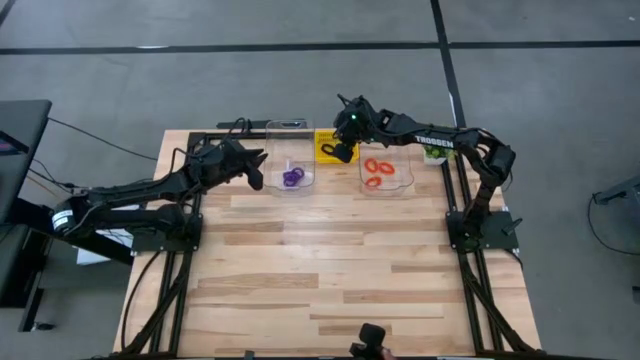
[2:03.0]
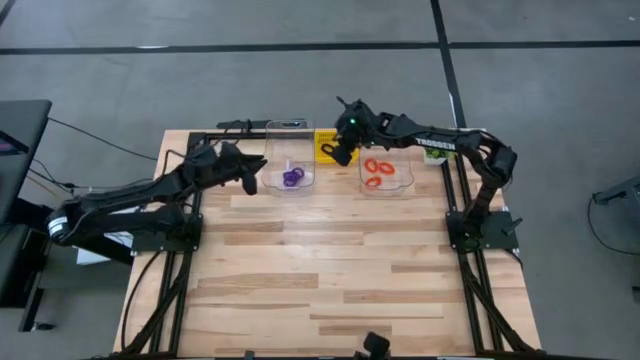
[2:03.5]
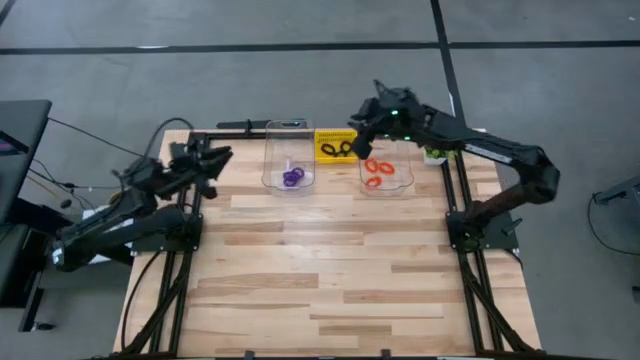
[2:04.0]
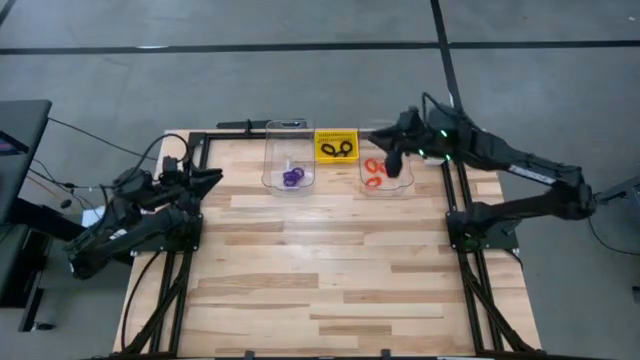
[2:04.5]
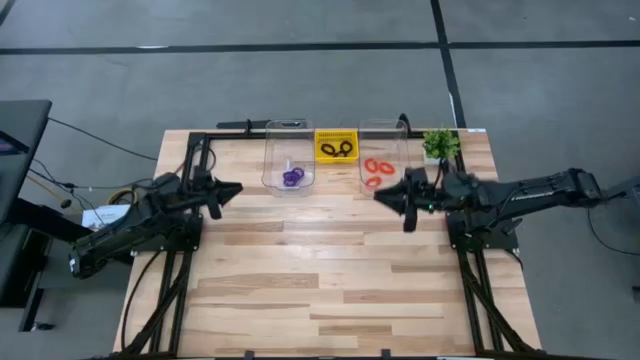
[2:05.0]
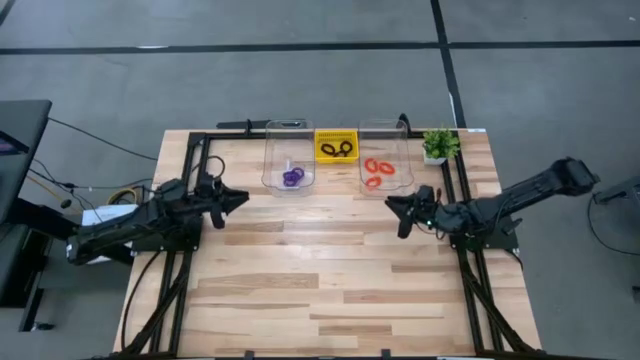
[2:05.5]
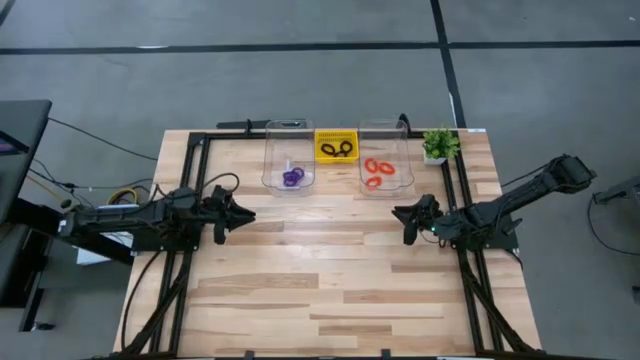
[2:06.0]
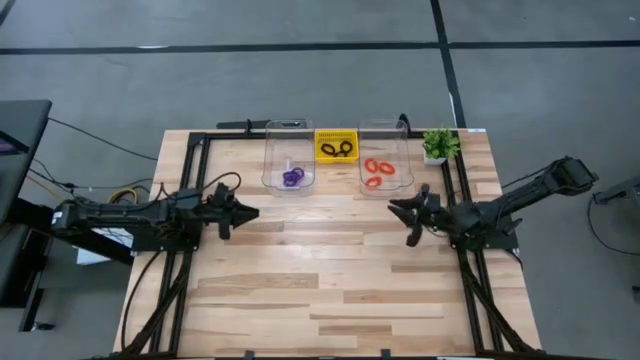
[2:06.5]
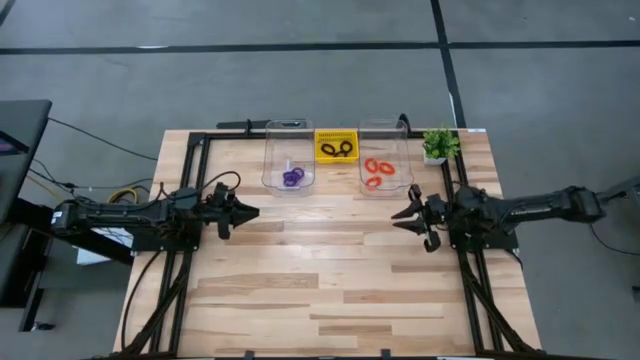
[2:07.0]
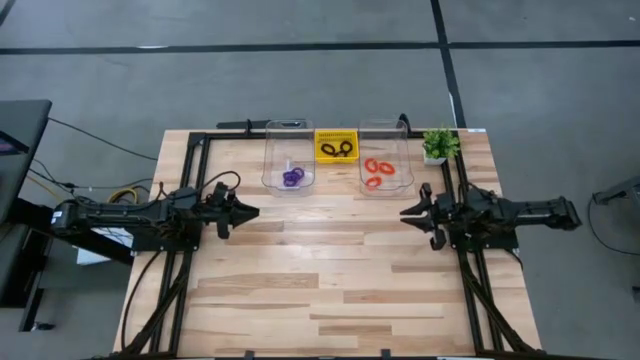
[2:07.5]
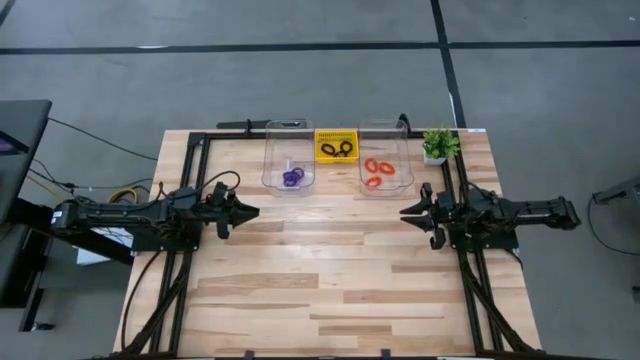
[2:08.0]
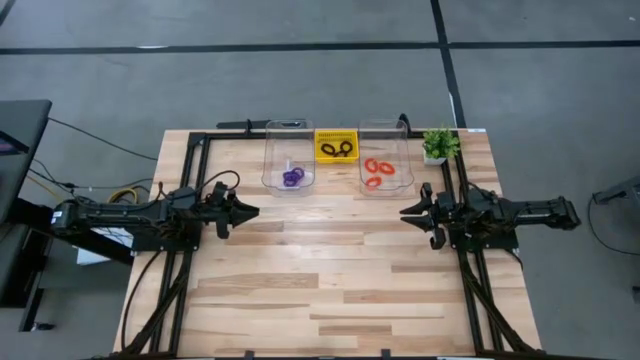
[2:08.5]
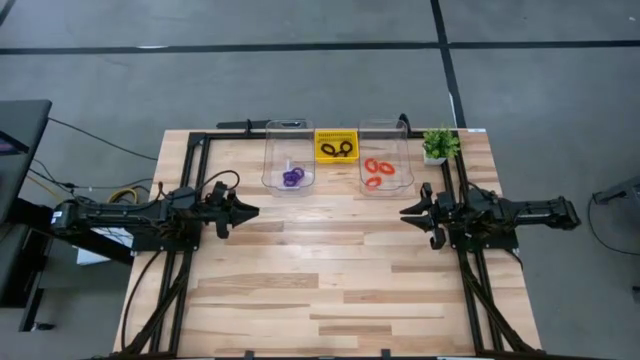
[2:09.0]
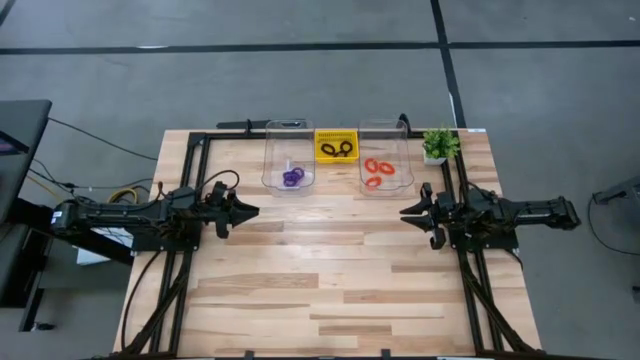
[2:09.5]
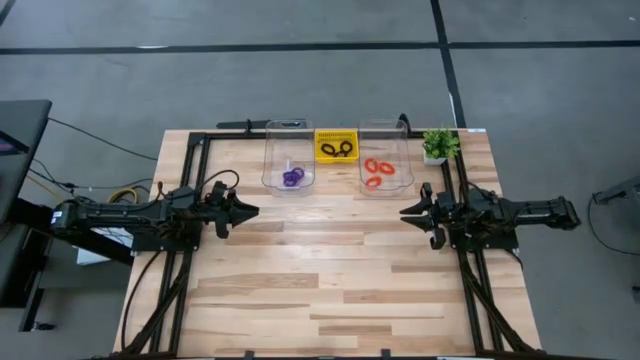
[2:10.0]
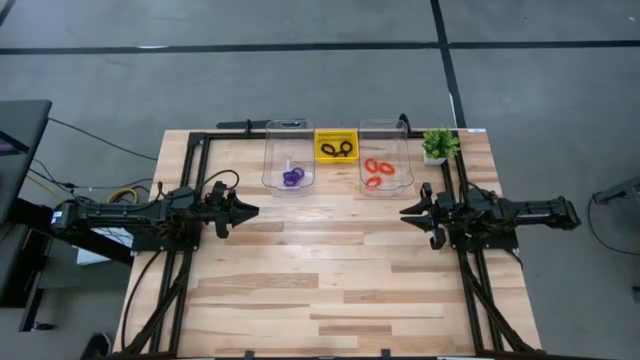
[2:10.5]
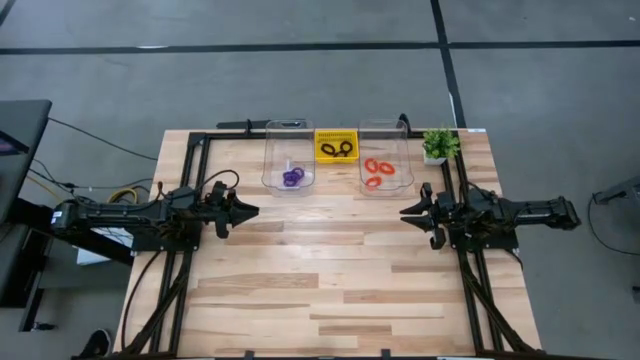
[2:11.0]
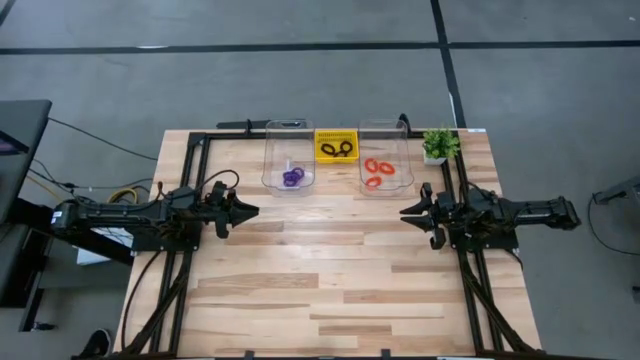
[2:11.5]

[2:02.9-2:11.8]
Task: Sort spring keychains
Return to Home Position

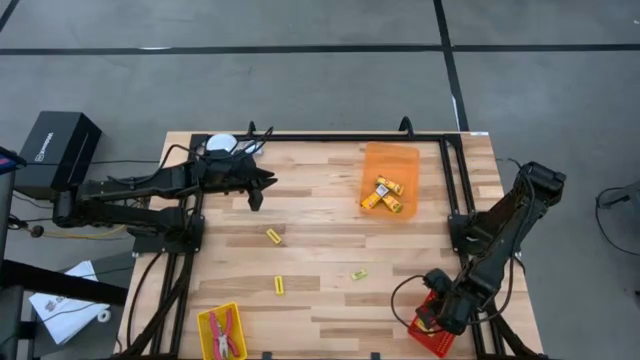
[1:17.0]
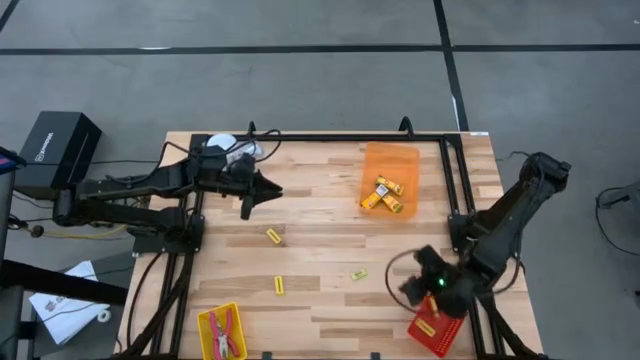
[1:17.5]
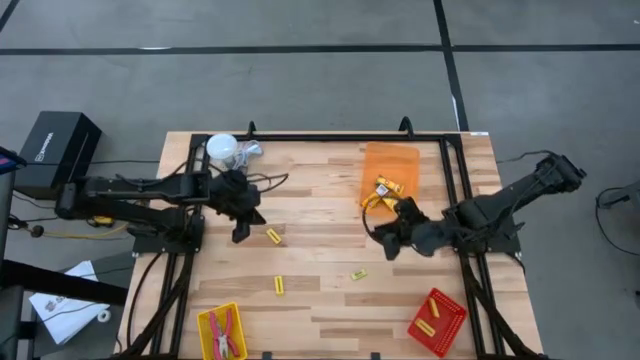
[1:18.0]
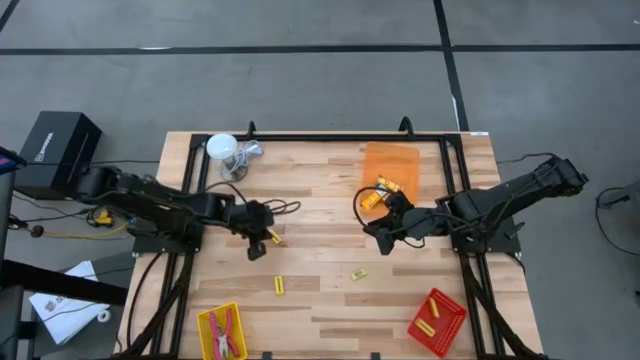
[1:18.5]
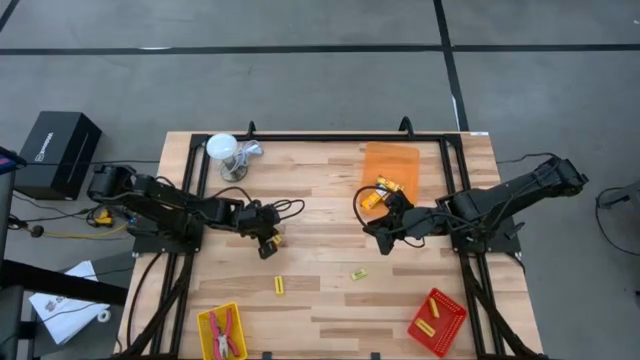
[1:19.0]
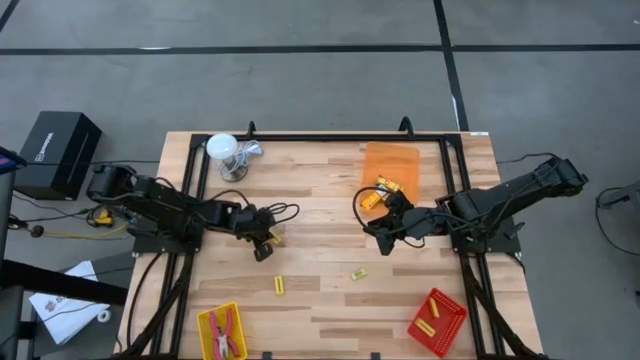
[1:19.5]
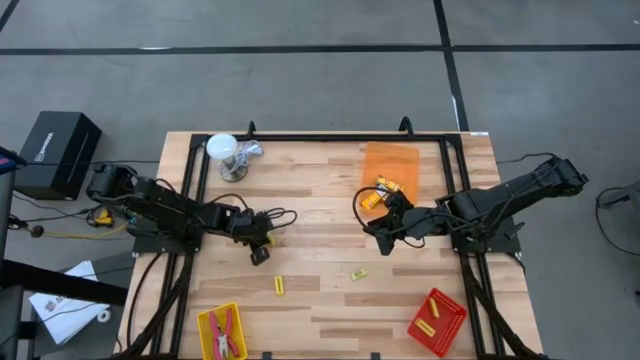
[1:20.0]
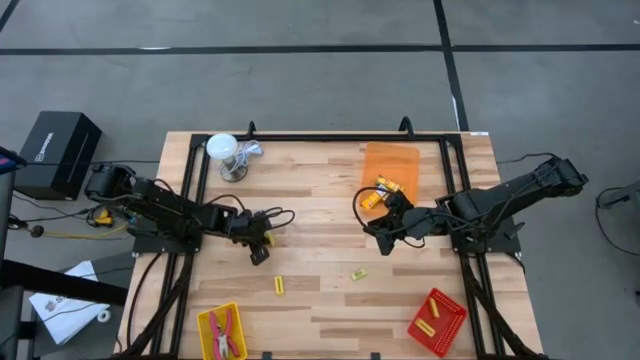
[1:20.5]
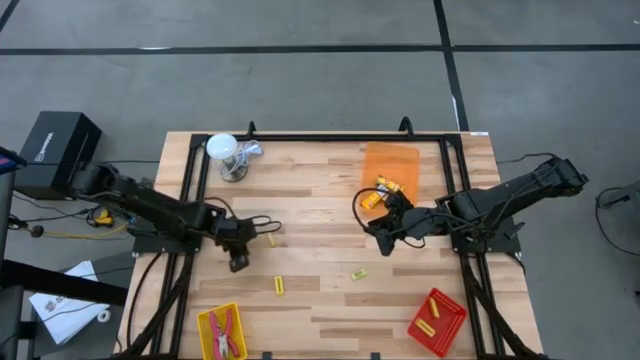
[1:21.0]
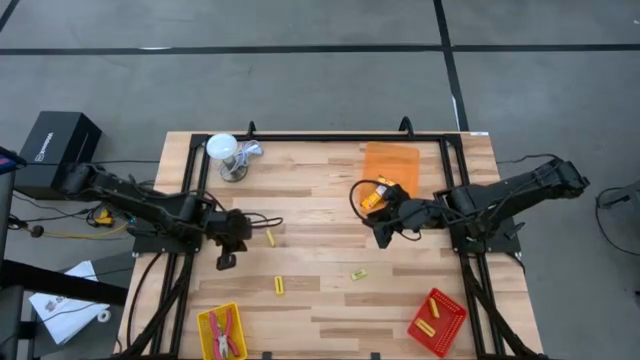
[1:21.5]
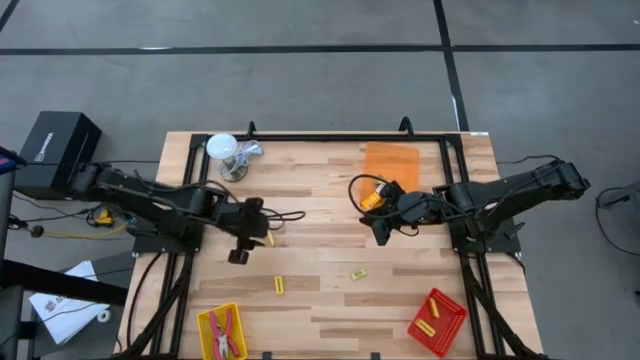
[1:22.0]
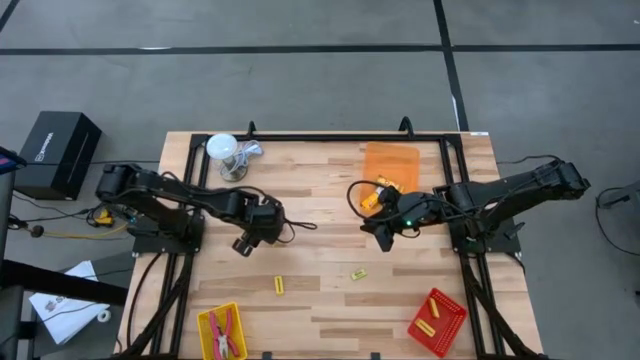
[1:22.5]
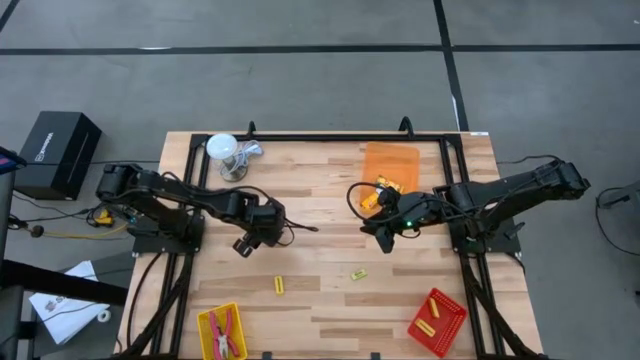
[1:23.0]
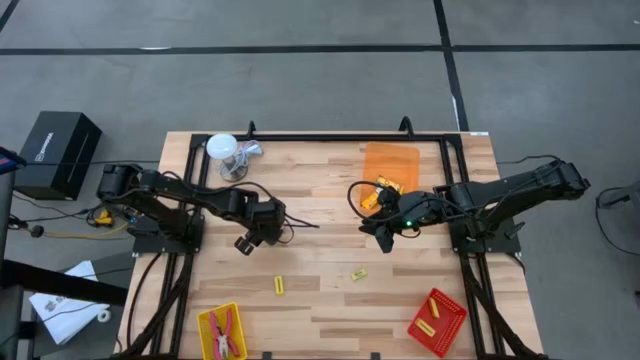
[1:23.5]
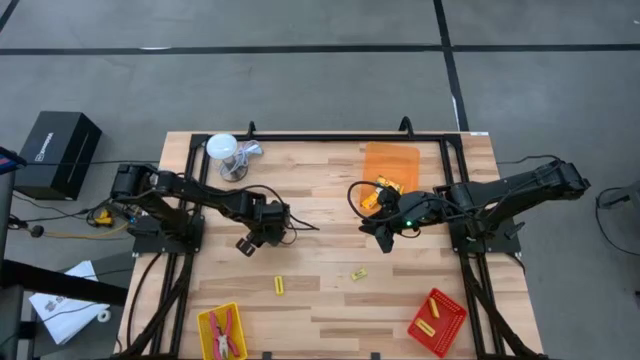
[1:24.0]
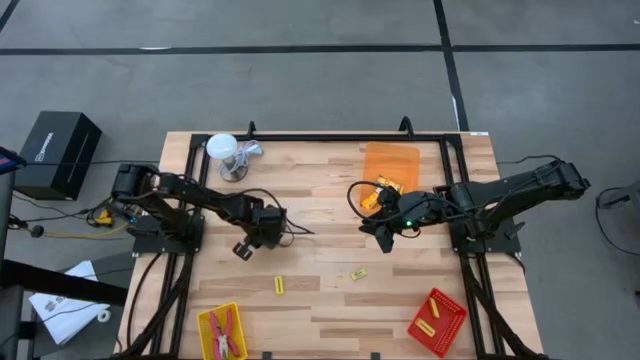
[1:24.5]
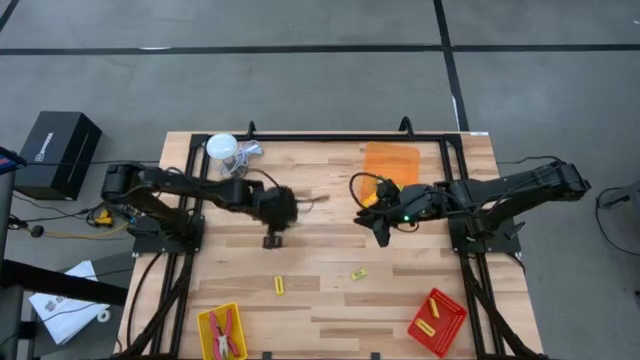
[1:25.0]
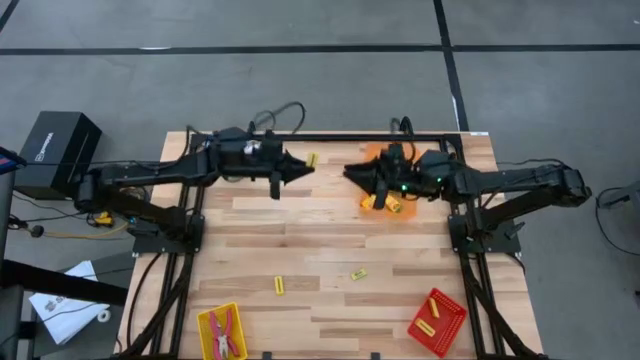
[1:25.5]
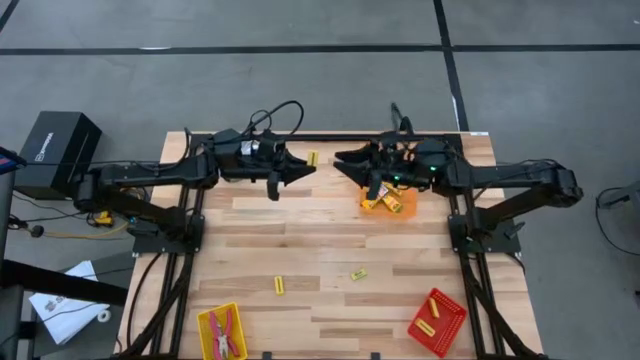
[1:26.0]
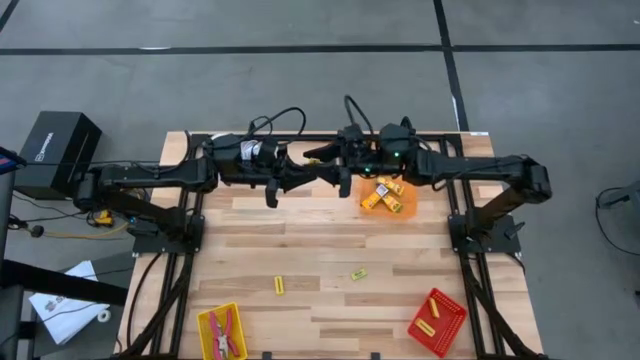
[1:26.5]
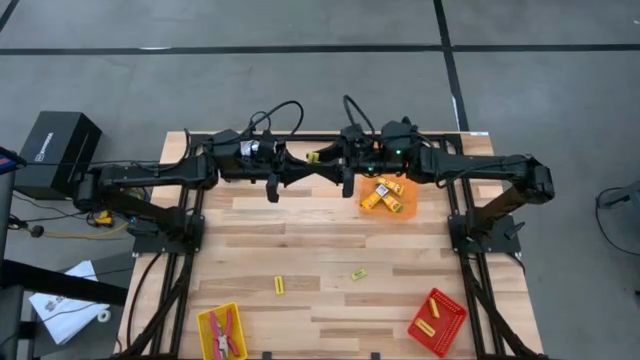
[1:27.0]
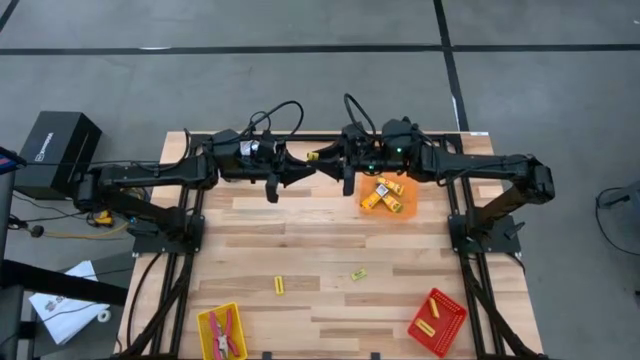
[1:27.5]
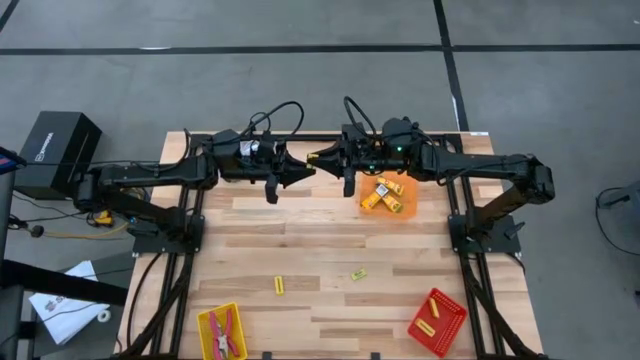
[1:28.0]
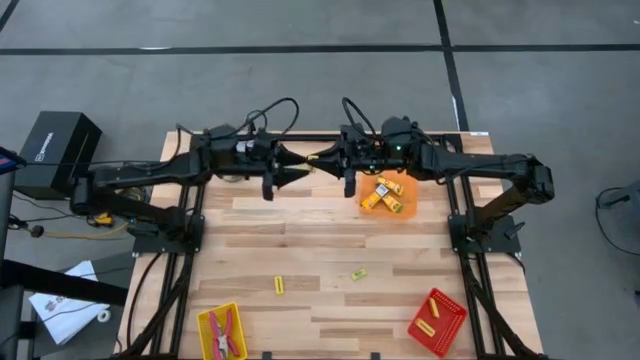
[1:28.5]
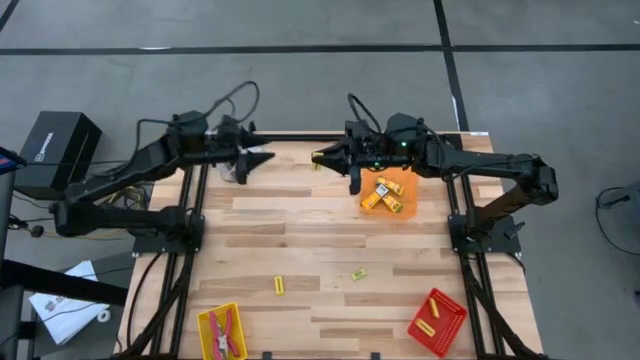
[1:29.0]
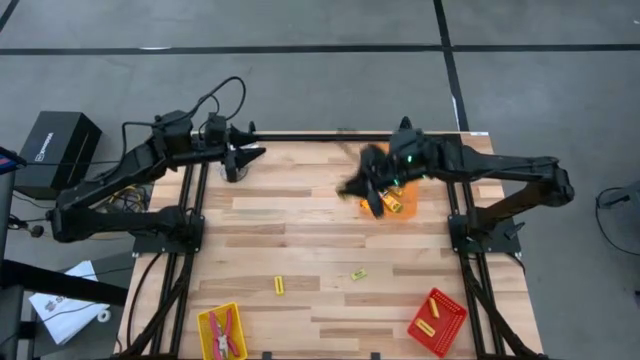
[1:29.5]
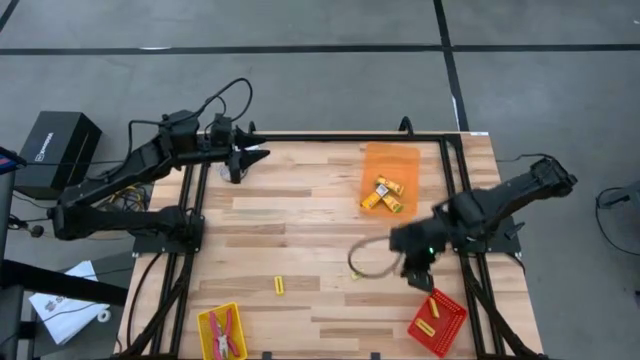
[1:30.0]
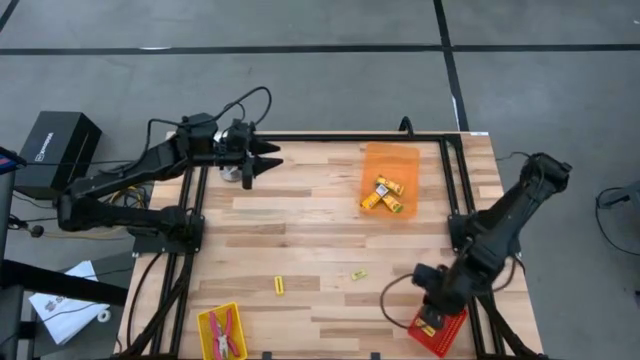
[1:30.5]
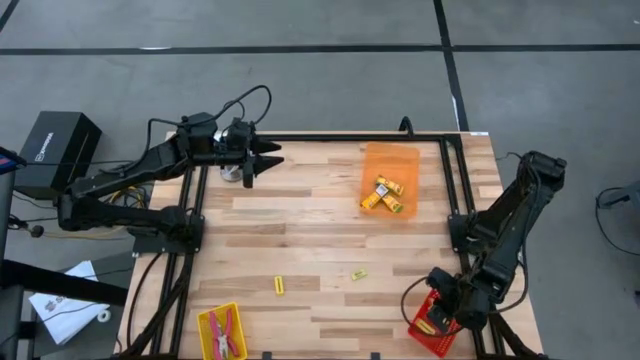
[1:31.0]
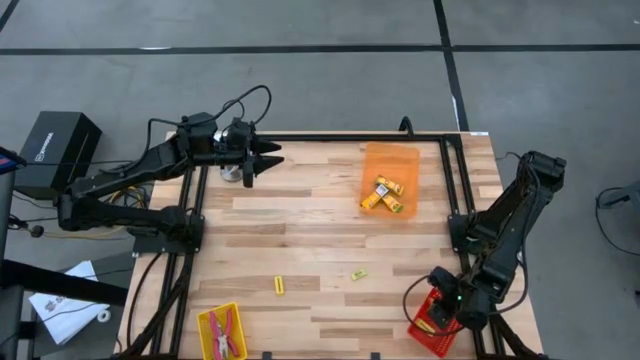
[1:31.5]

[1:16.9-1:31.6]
Task: Pick & Place School Supplies
Put the yellow eraser into the red bin
